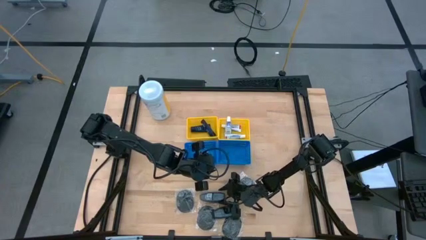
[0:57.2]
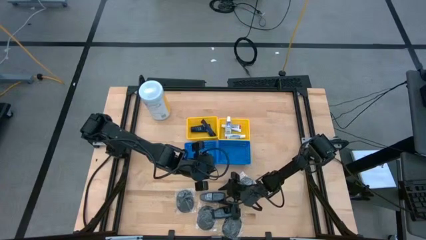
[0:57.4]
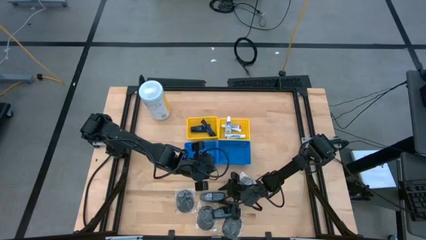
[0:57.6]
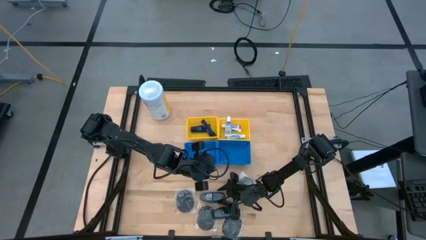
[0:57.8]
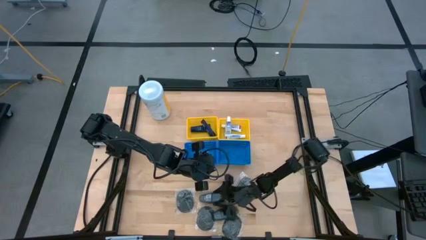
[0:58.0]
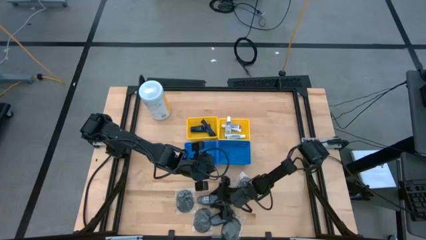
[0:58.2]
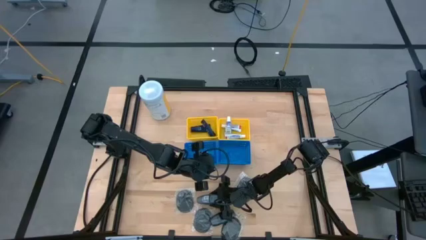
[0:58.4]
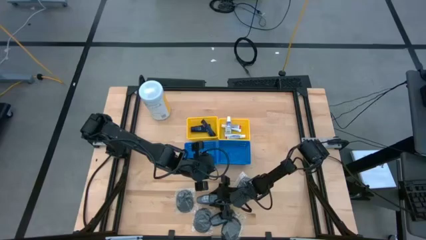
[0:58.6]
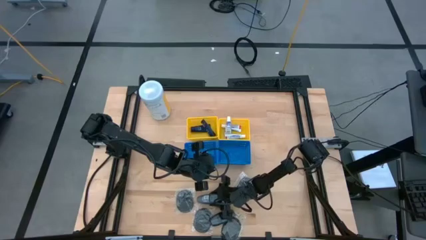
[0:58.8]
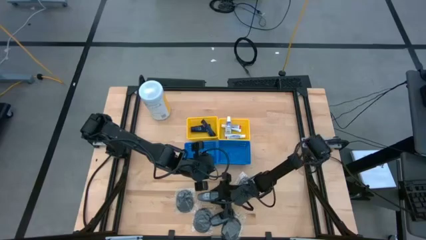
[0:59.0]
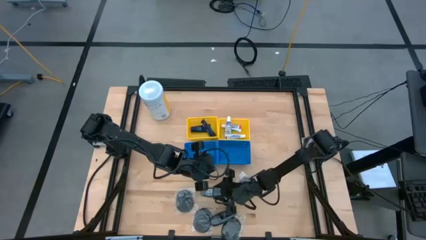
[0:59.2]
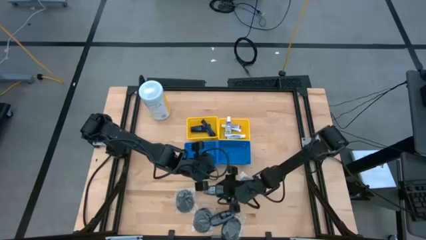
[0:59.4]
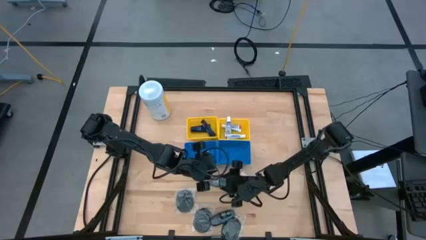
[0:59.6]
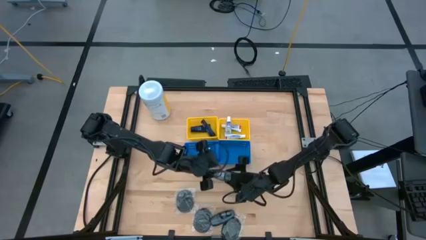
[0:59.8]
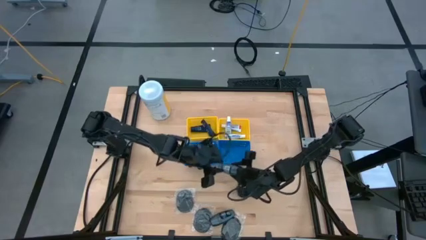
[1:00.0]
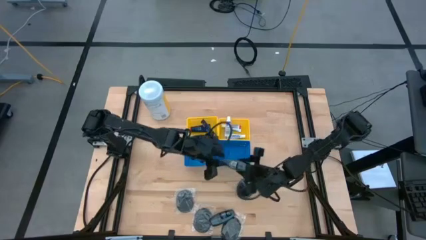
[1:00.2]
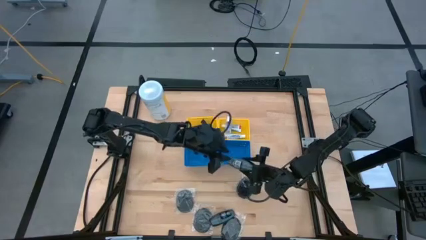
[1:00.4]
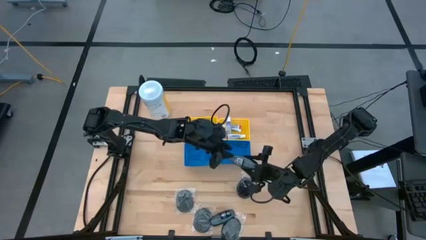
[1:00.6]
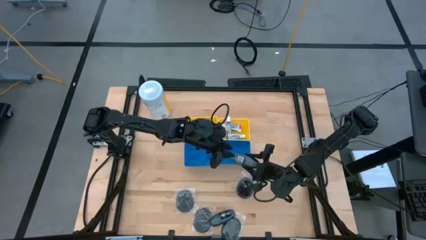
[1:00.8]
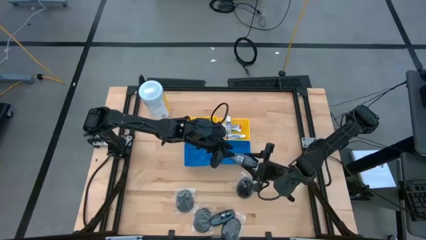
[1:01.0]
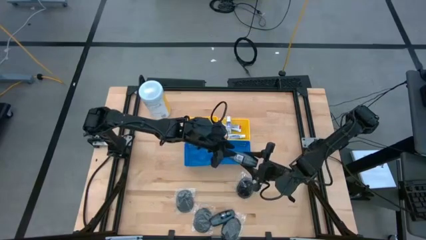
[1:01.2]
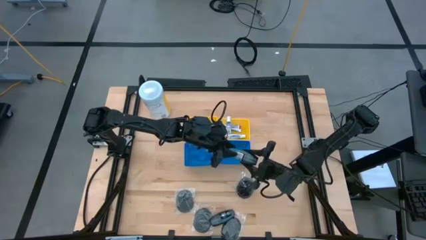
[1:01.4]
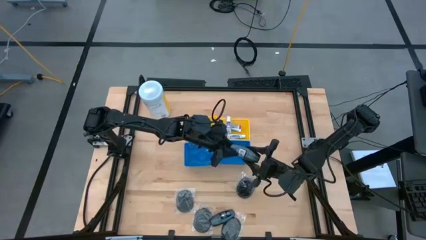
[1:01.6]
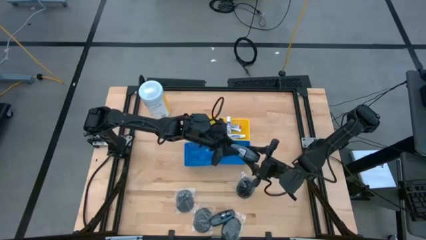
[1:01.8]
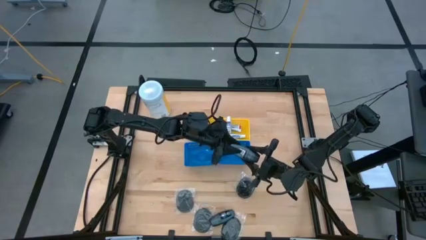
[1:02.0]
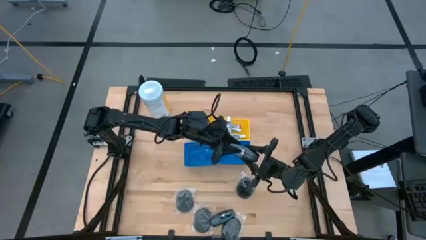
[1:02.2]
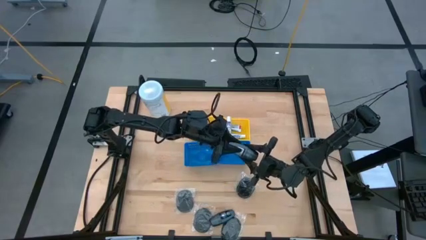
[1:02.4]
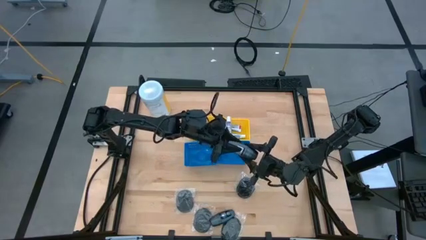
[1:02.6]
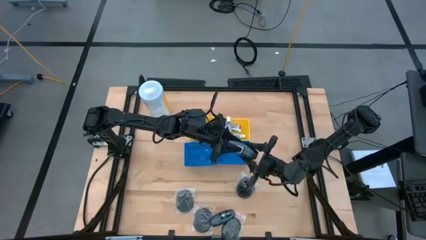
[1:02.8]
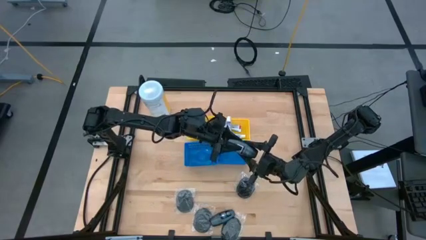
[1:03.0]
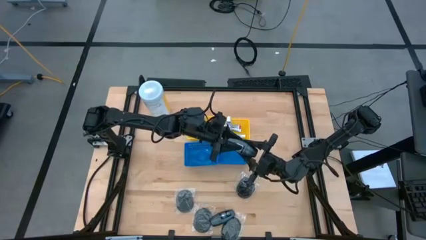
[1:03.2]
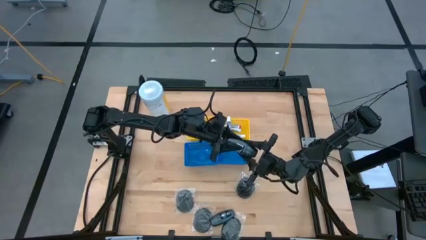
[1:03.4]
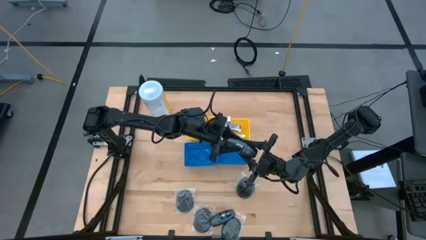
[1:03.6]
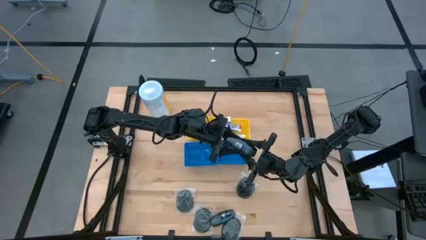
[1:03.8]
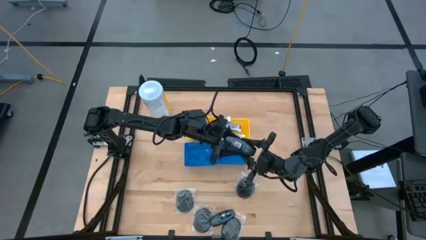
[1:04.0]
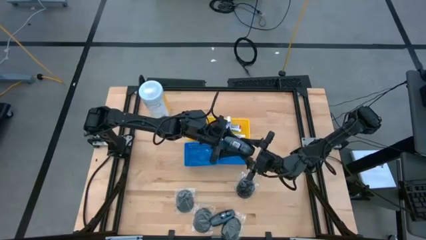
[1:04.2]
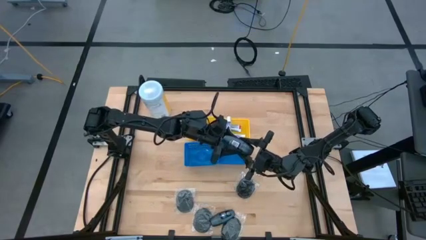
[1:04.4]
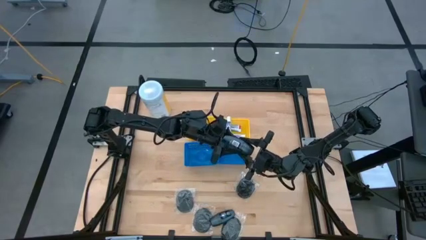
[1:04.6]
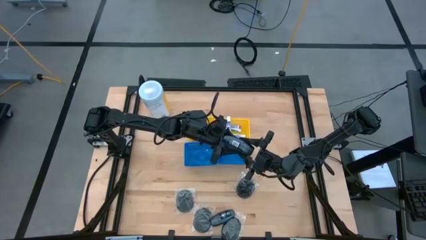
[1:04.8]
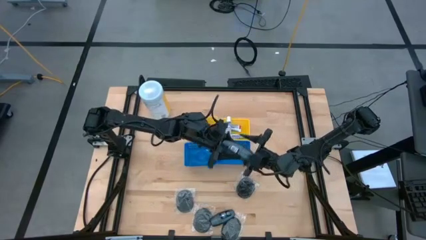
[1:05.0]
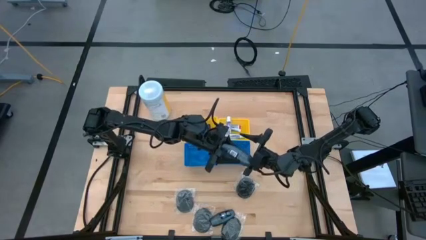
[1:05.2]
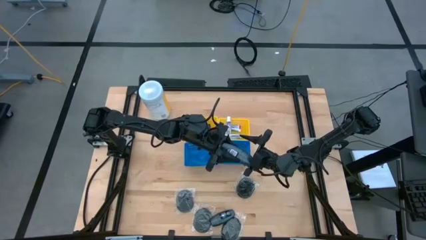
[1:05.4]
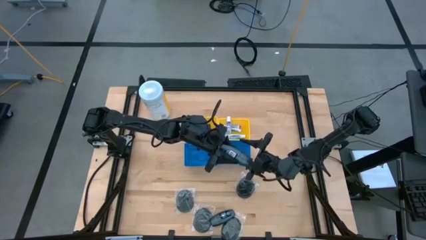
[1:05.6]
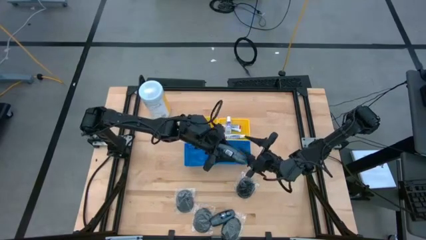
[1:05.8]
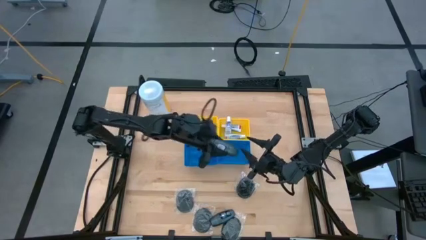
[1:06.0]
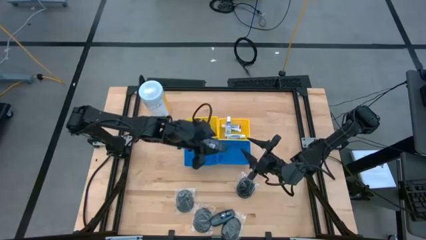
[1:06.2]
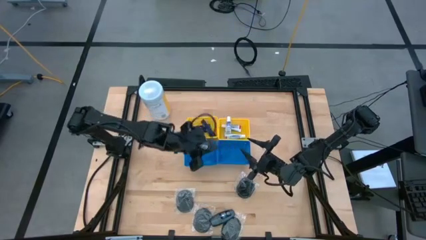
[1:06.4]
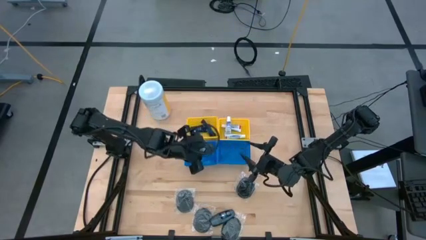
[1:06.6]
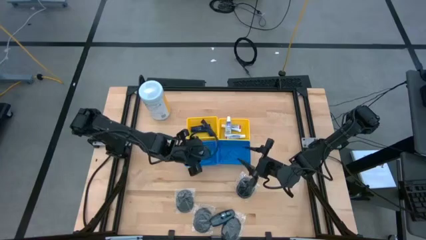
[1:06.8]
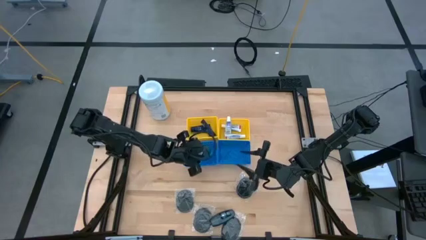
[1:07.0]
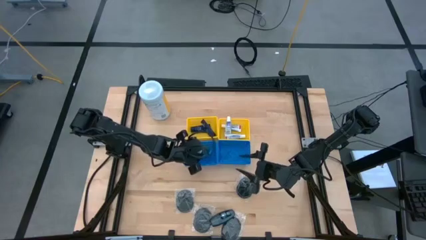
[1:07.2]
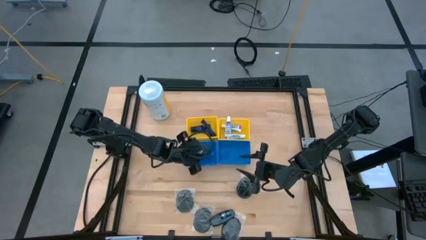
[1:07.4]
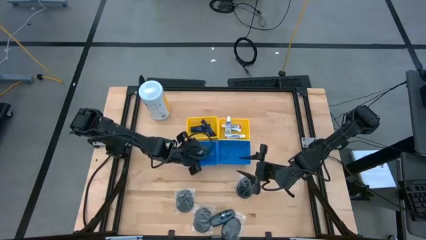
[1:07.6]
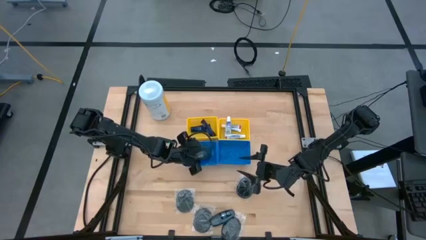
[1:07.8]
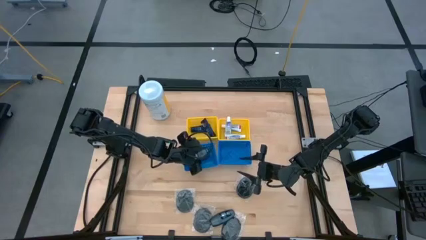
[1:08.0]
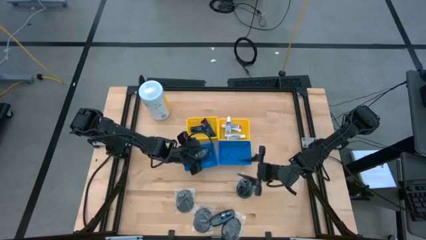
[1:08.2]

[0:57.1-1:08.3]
Task: Pick & Place Travel size toiletries
Put the top deodorant into the left blue bin

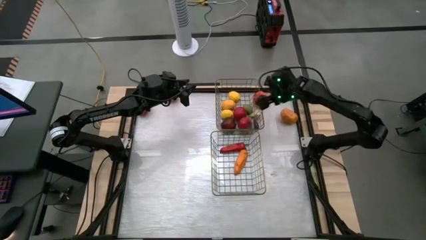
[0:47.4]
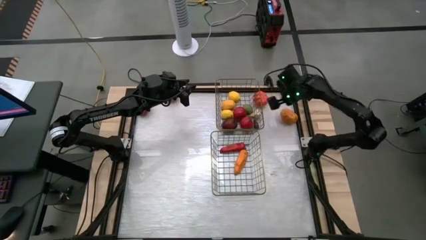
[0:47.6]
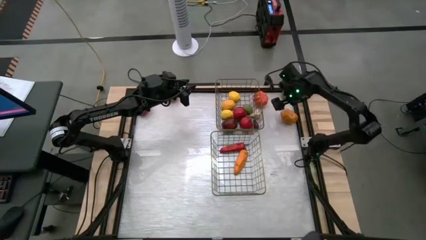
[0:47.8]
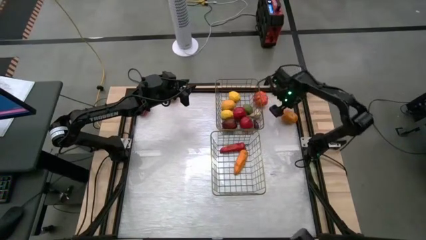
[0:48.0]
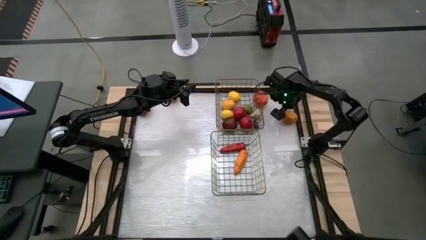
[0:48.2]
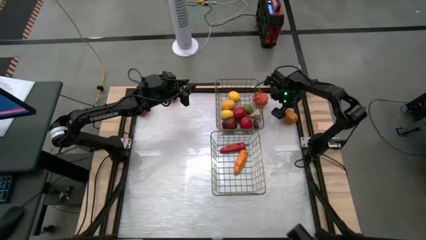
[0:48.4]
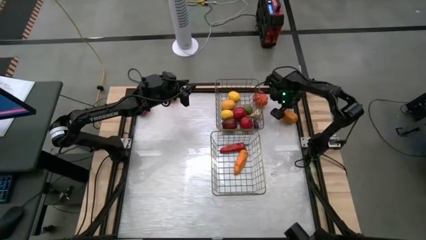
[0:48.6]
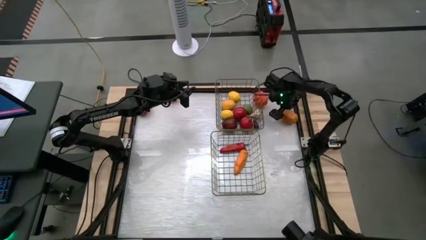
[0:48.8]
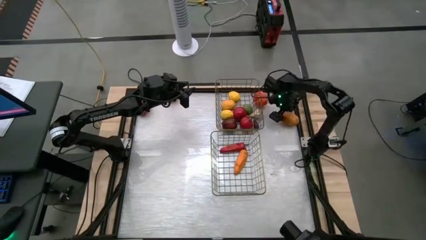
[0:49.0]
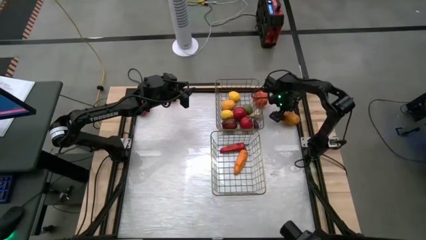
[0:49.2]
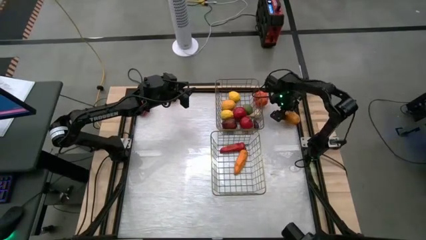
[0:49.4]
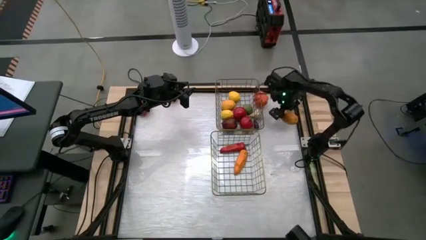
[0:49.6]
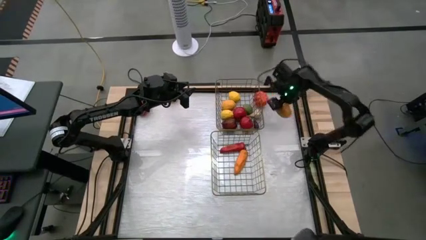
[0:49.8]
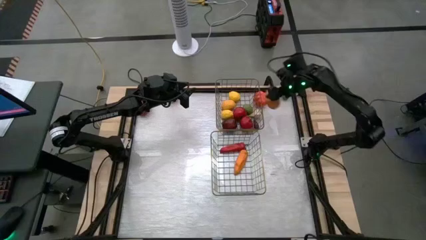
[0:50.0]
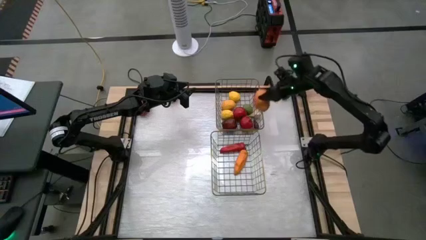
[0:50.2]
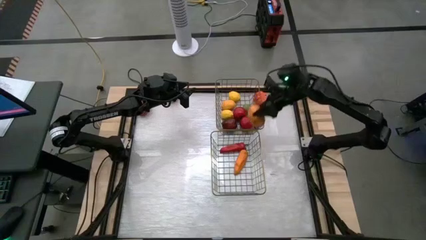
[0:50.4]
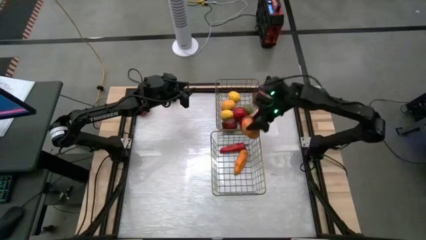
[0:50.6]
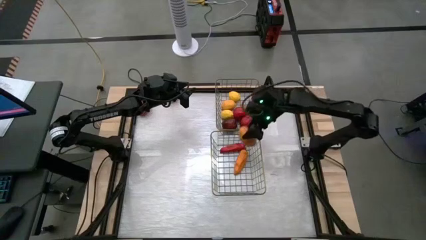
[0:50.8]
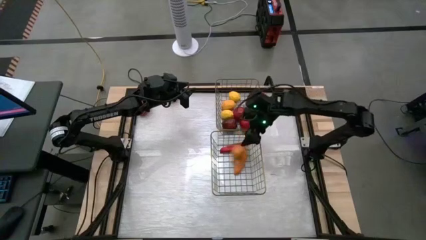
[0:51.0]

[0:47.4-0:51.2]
Task: Sort produce into baskets
Put the brown potato into the bottom wire basket
